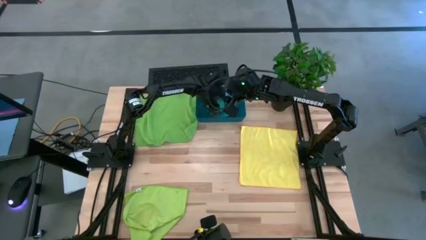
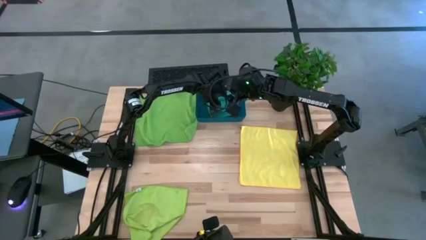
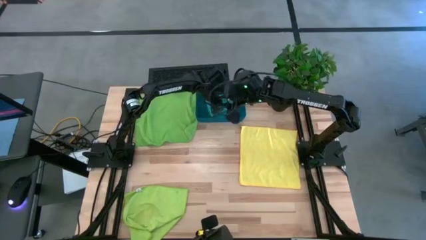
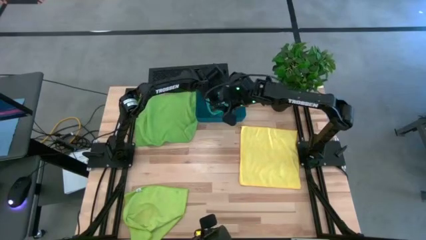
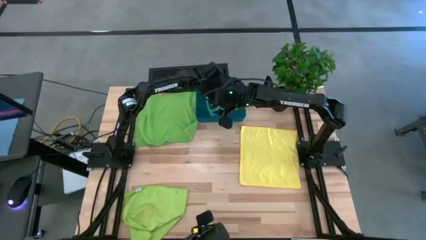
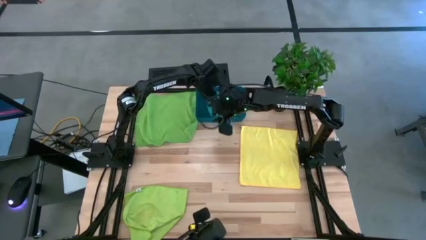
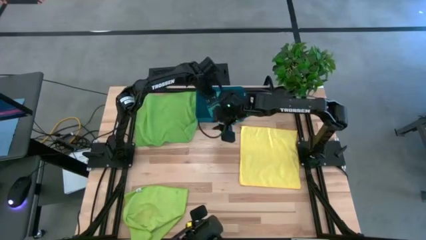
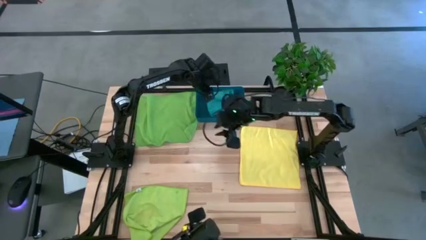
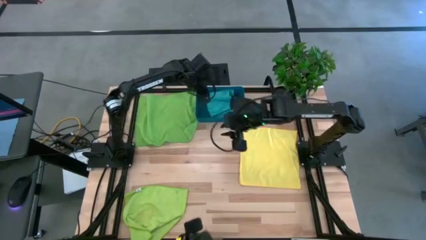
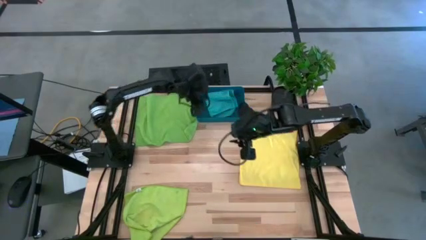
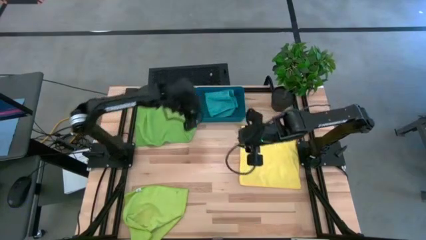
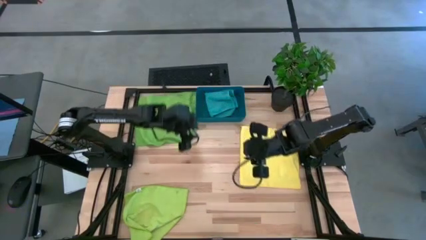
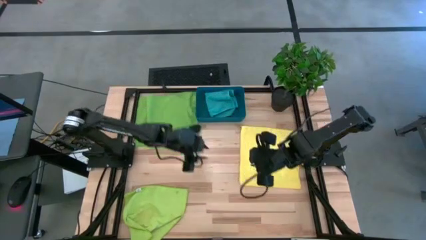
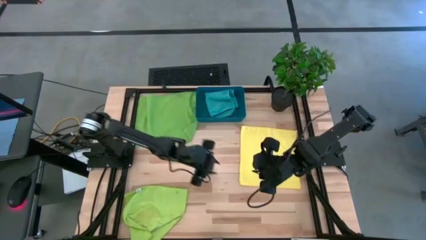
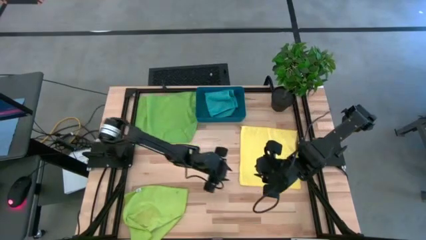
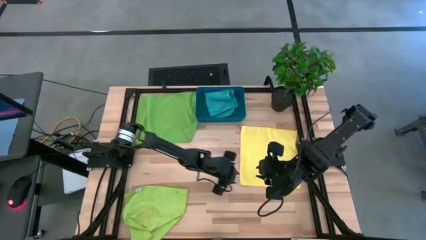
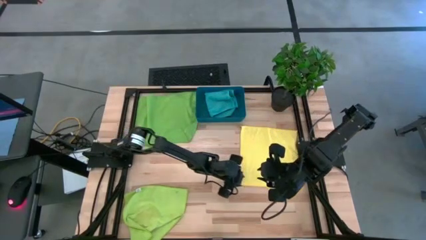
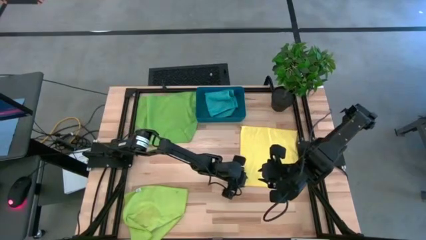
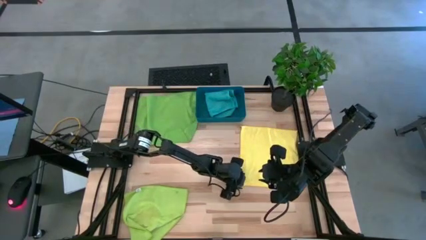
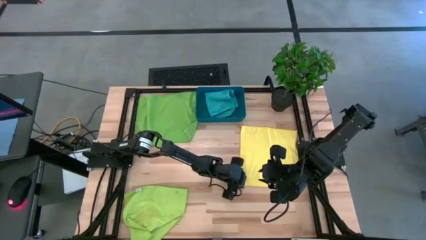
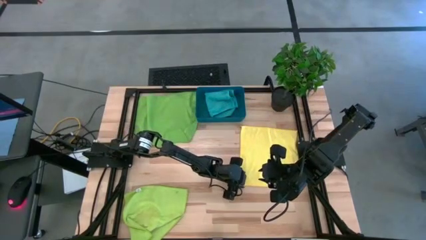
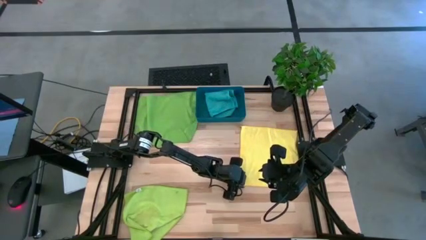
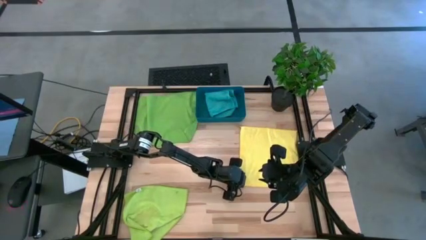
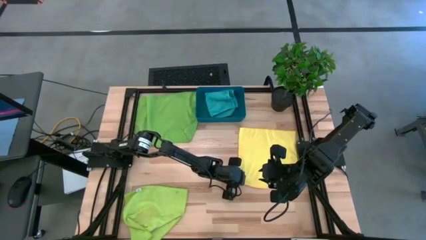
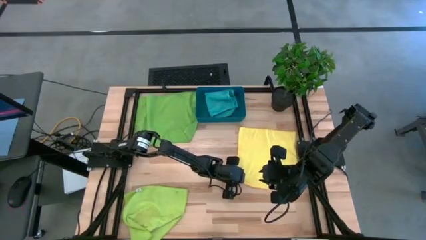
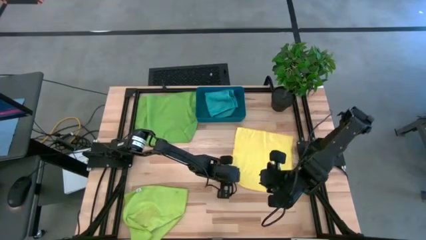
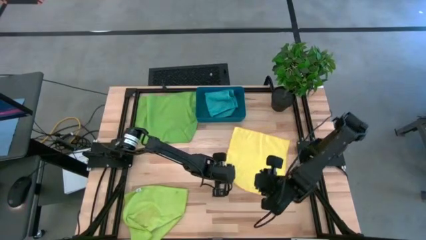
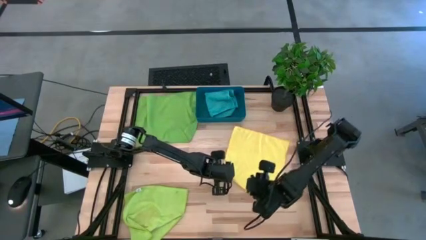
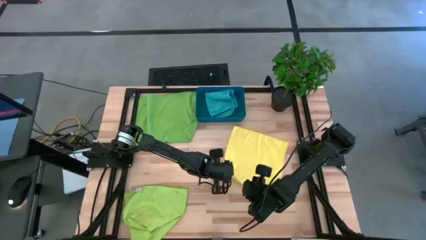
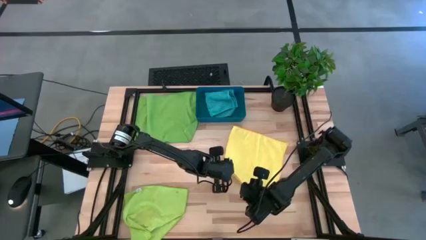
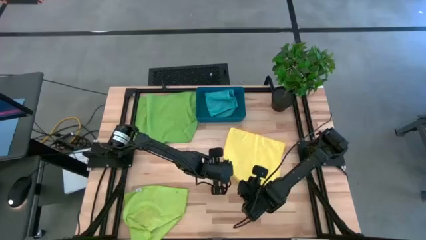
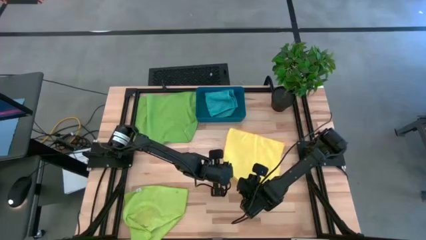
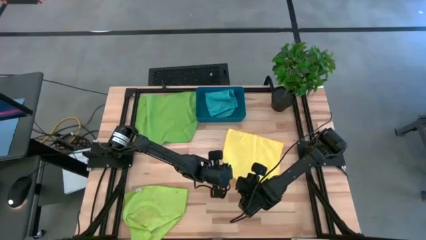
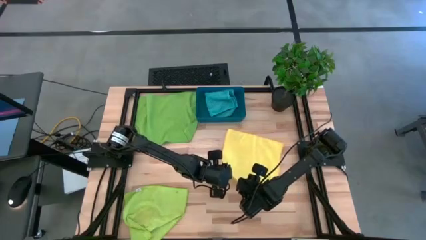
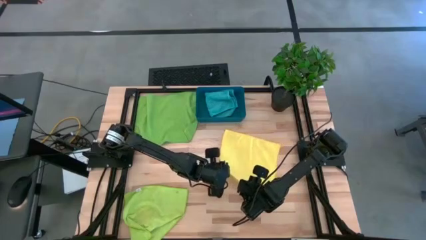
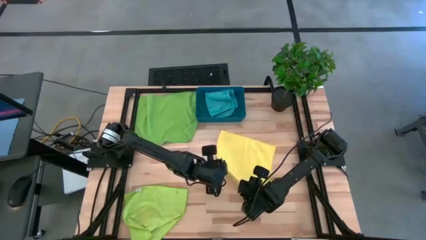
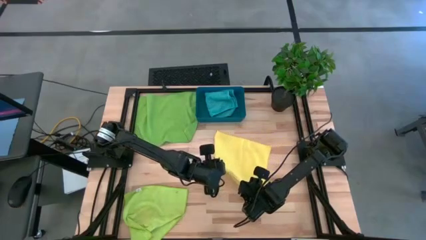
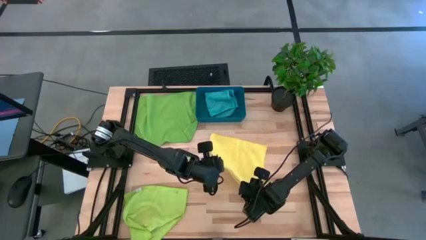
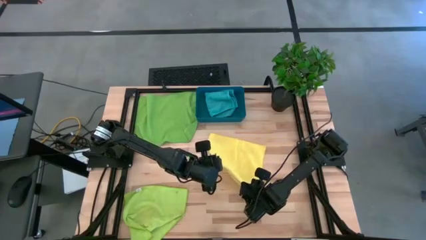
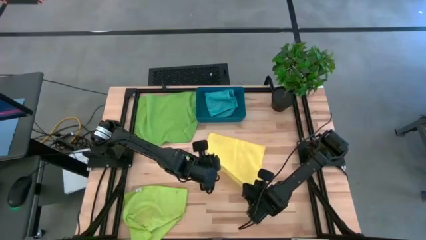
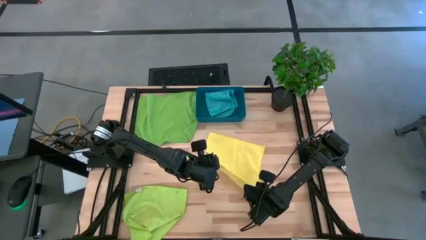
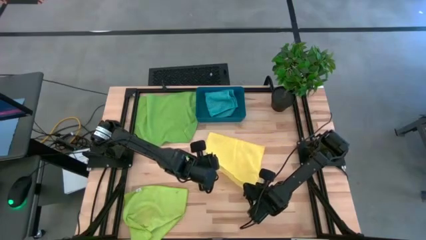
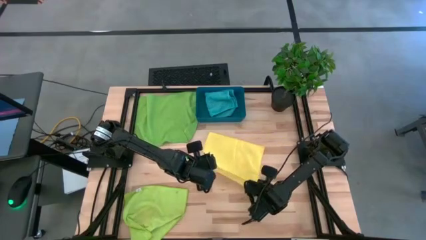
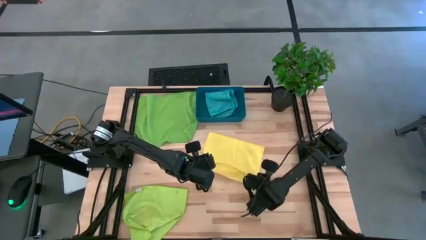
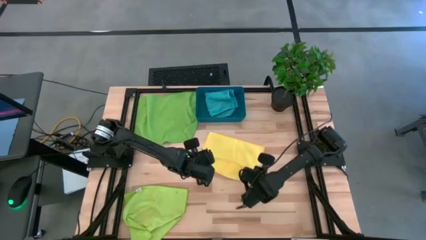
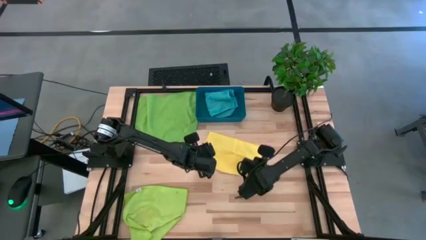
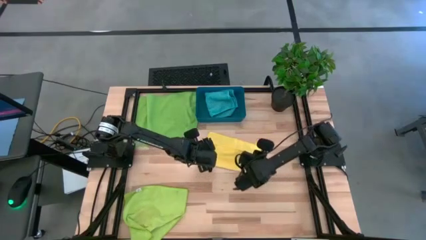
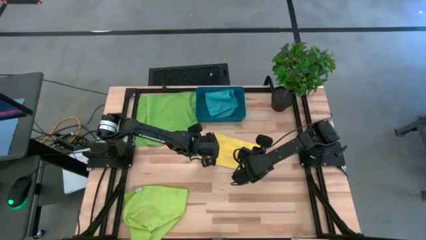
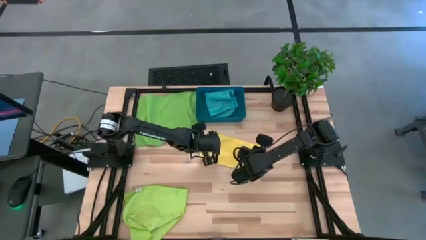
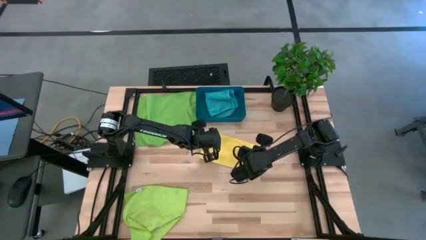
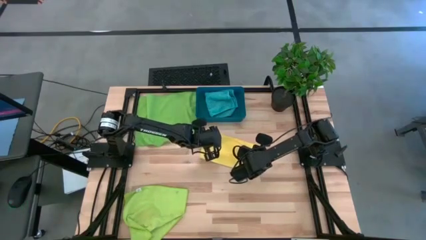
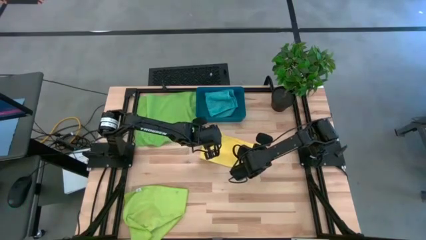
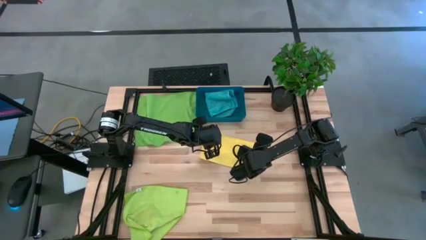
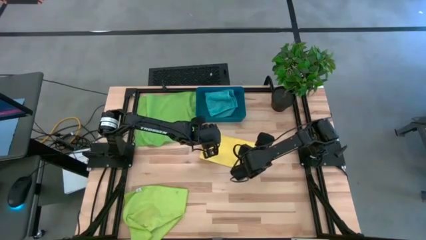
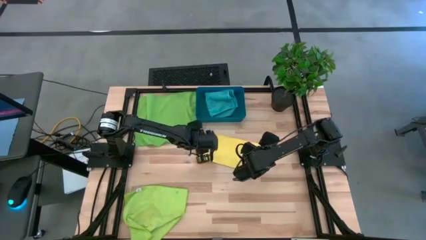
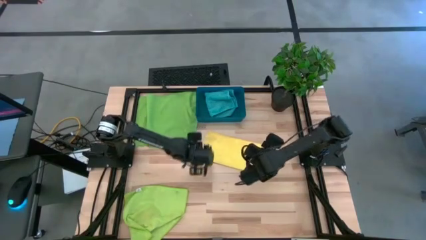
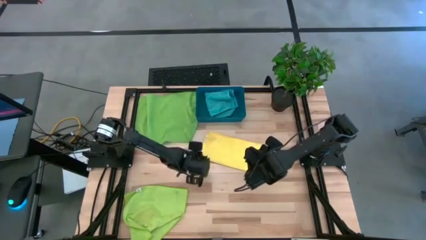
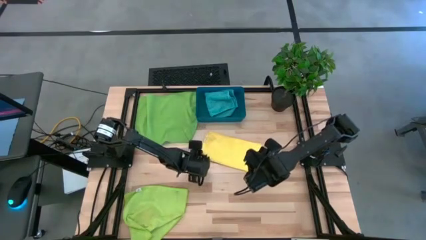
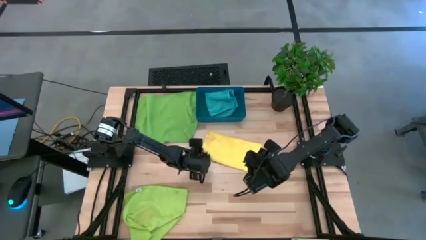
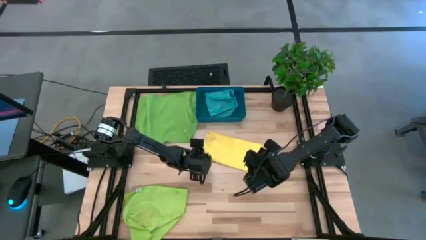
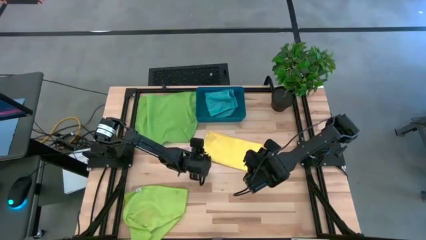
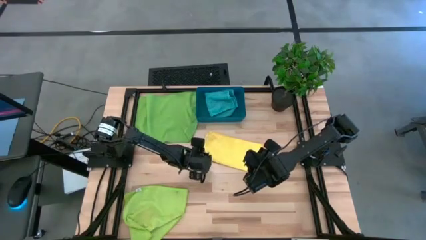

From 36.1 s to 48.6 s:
Task: Fold microfiber towels
Fold the yellow microfiber cloth

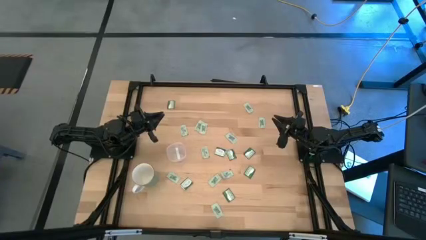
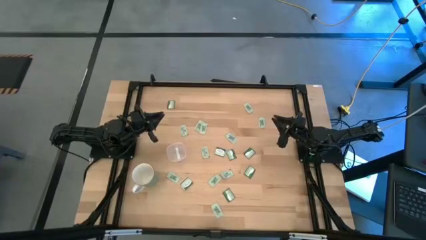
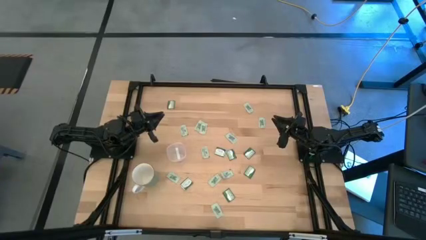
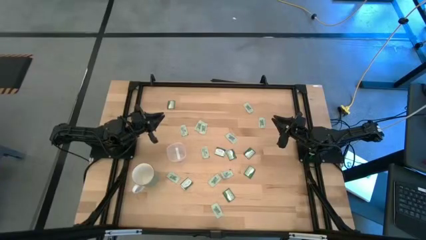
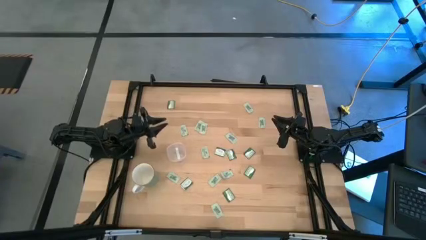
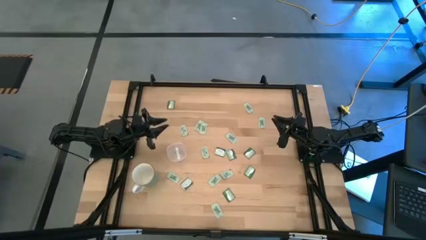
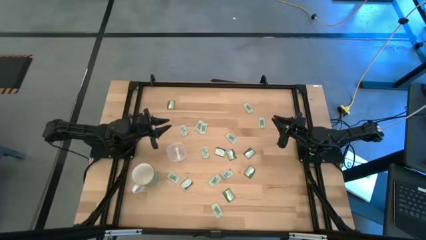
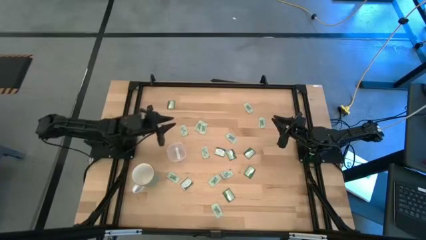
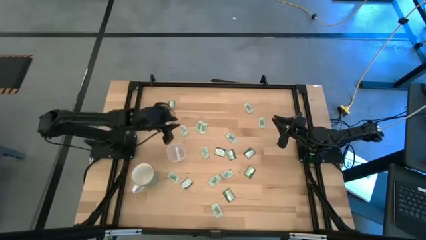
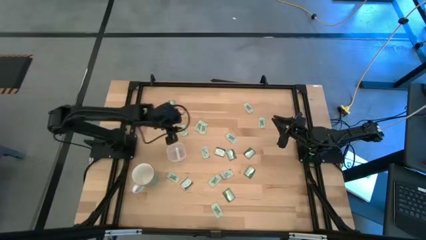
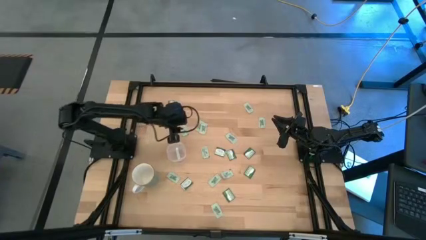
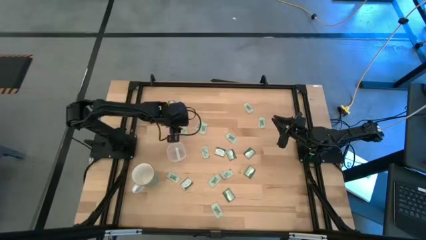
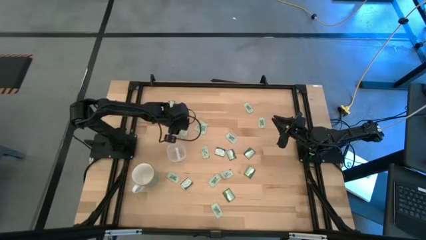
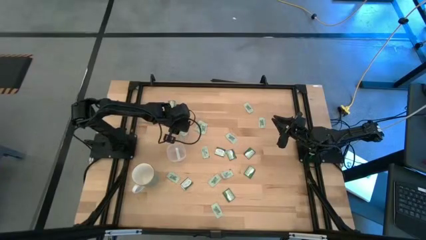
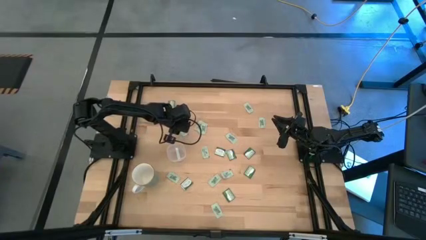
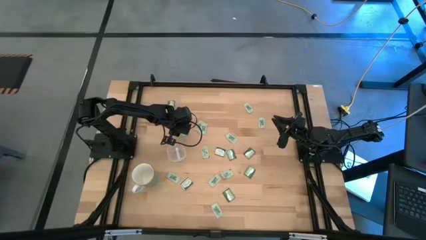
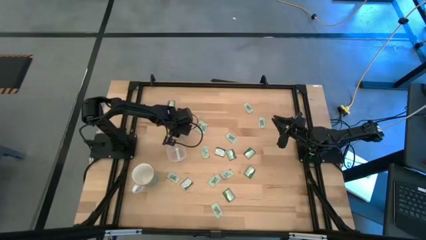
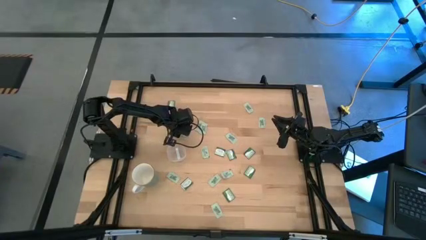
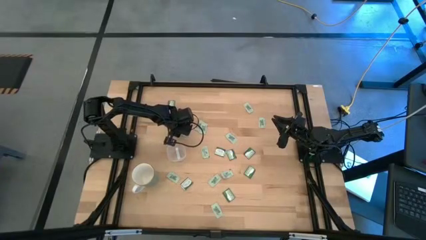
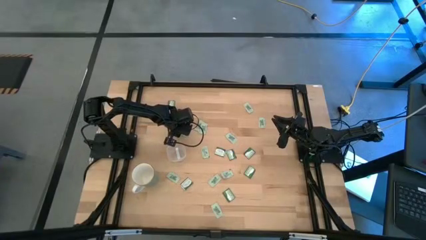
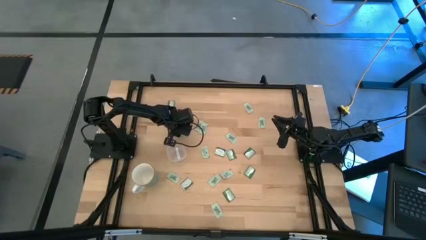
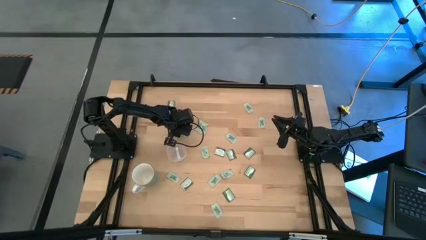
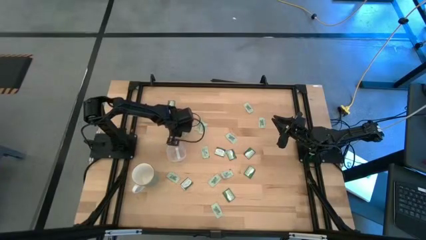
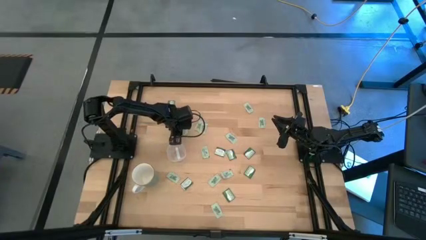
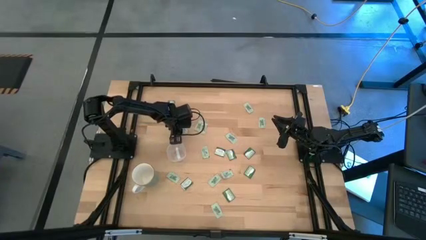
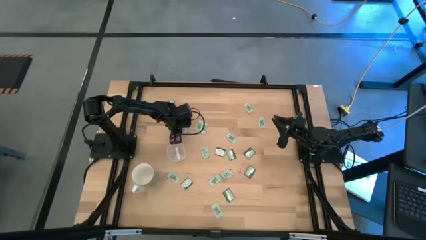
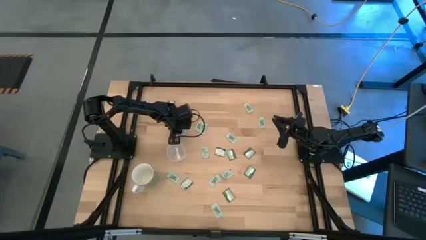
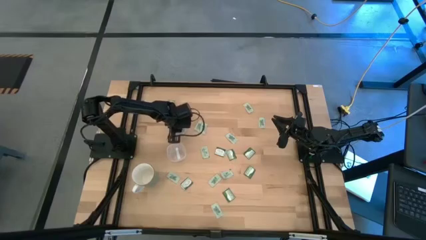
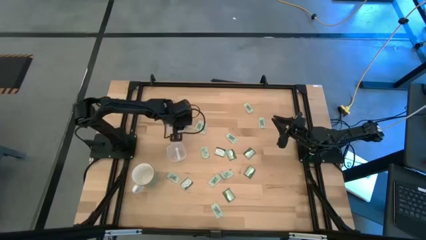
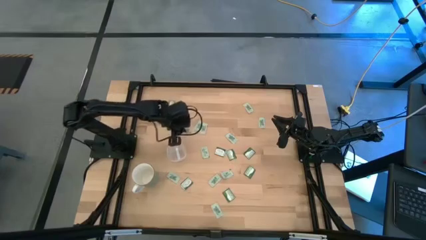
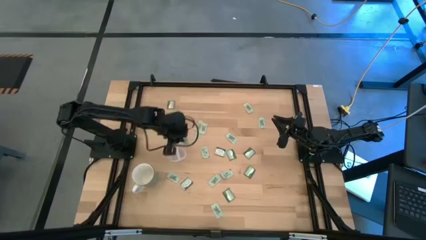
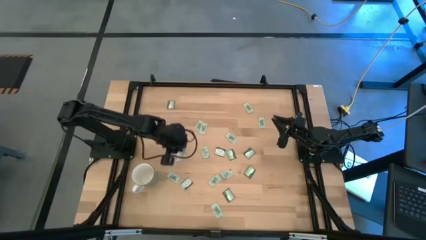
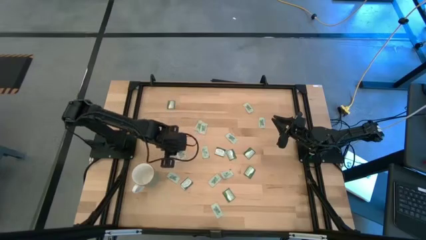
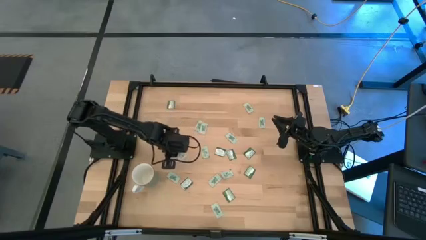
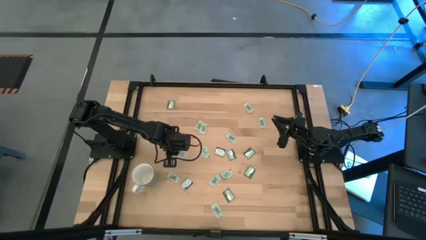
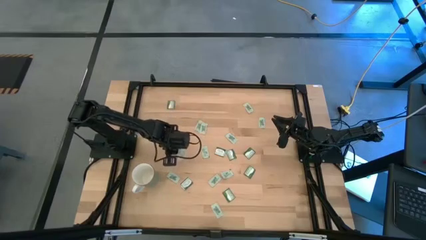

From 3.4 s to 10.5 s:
Task: Pick and place Stevia / Truvia into bins
Put the green stevia packet into the transparent container
